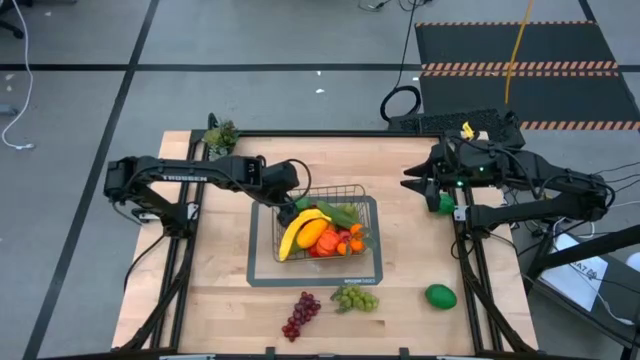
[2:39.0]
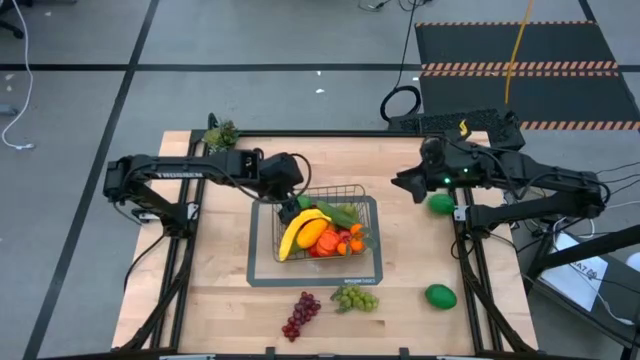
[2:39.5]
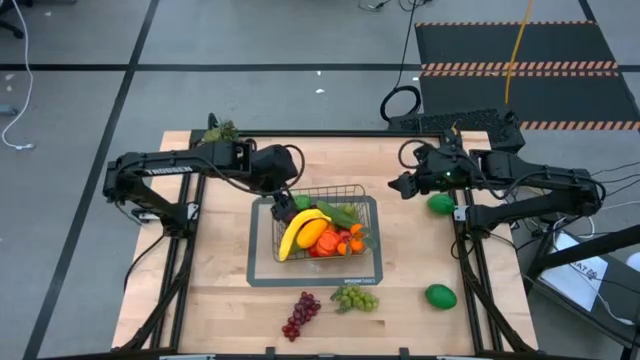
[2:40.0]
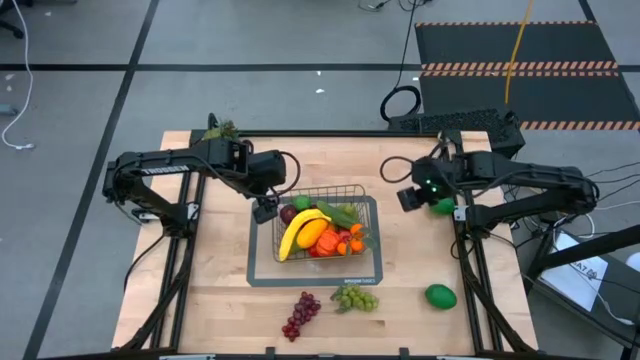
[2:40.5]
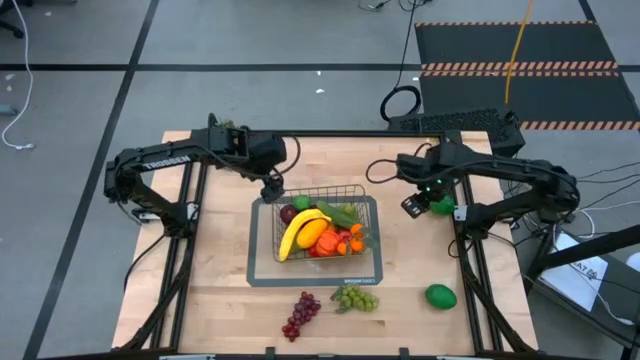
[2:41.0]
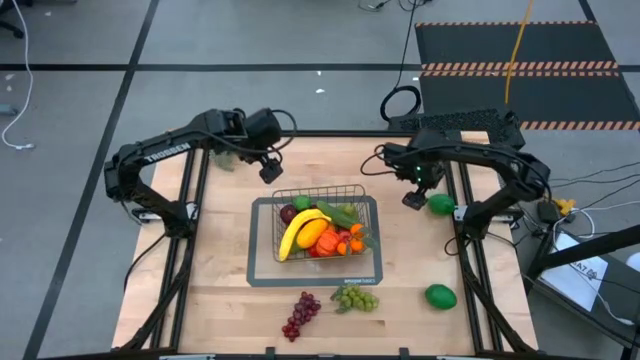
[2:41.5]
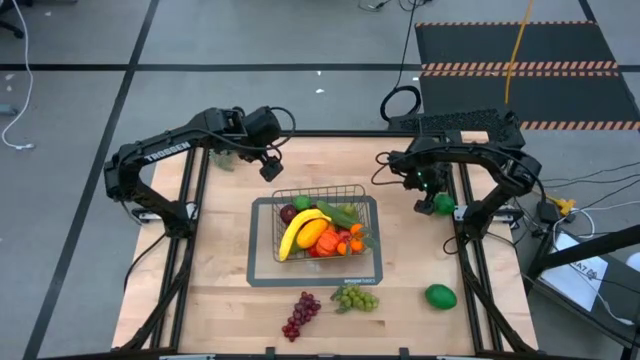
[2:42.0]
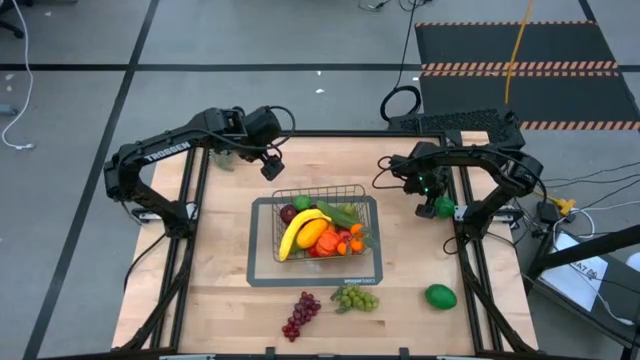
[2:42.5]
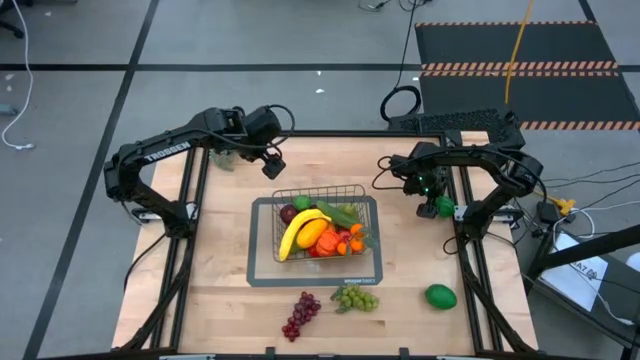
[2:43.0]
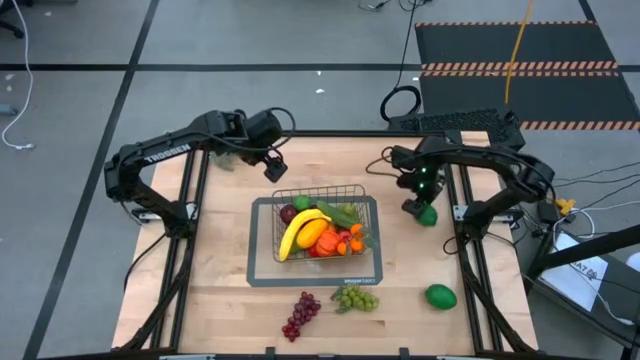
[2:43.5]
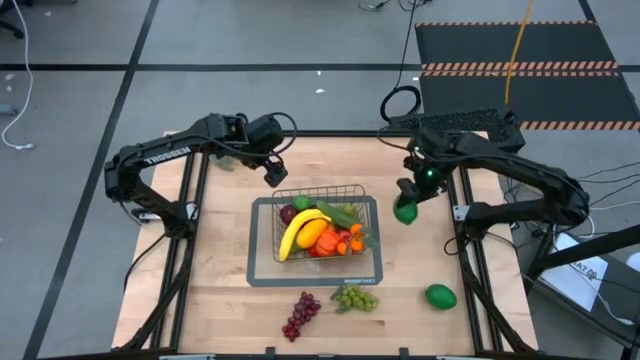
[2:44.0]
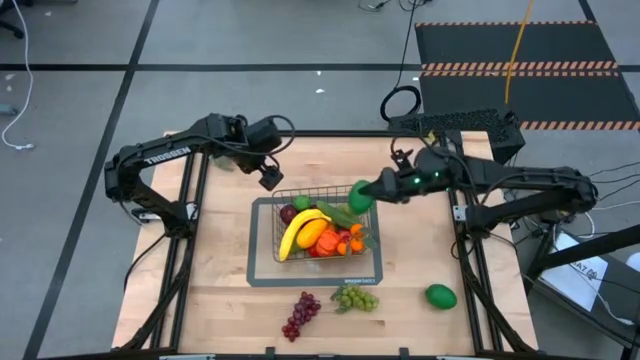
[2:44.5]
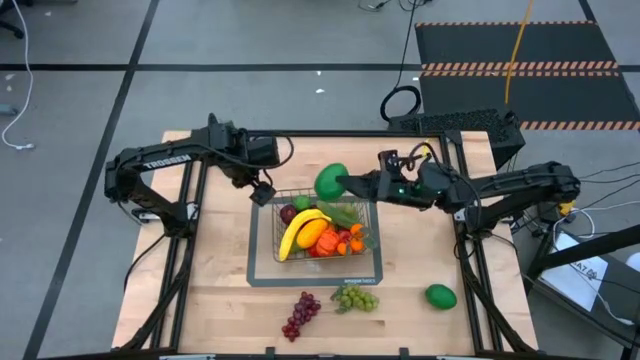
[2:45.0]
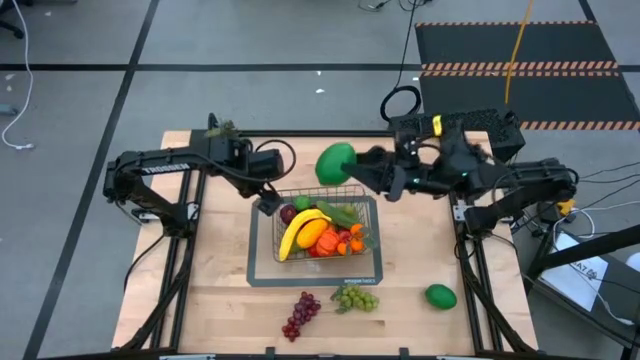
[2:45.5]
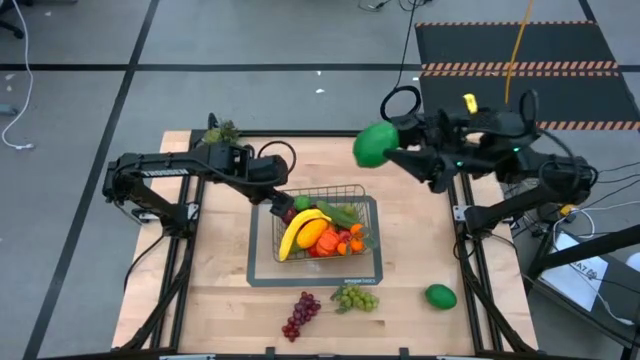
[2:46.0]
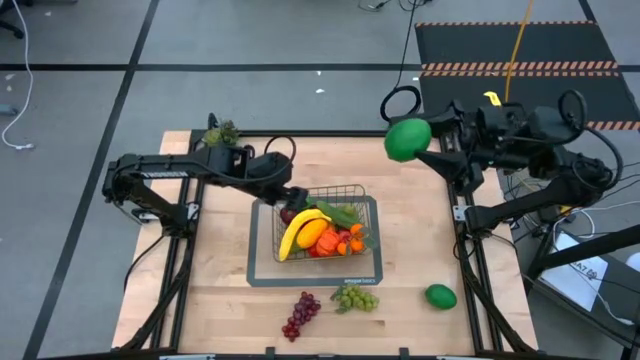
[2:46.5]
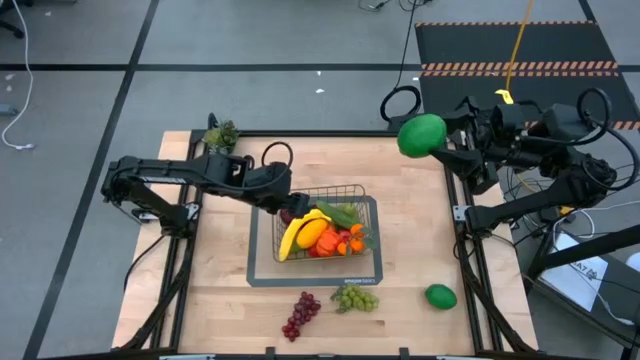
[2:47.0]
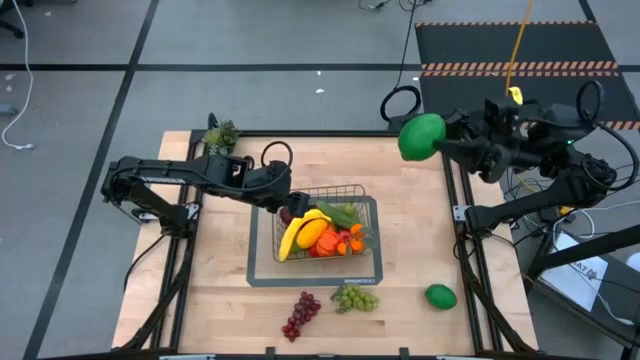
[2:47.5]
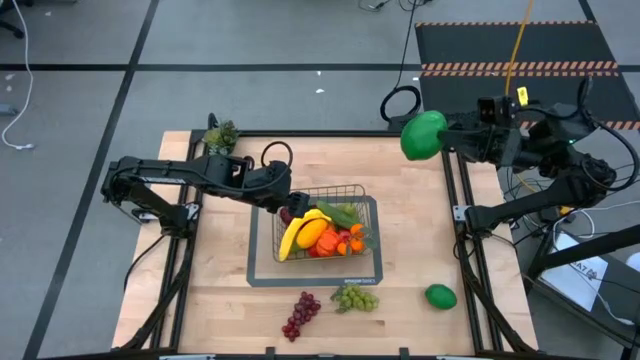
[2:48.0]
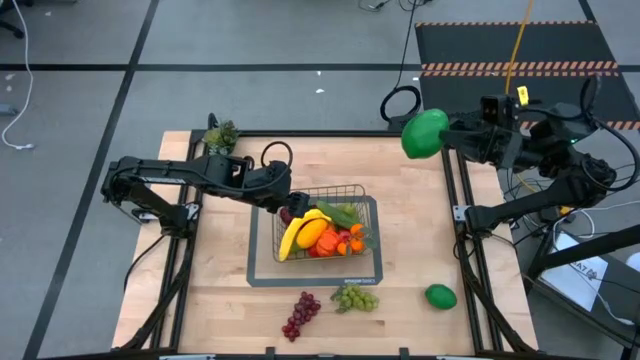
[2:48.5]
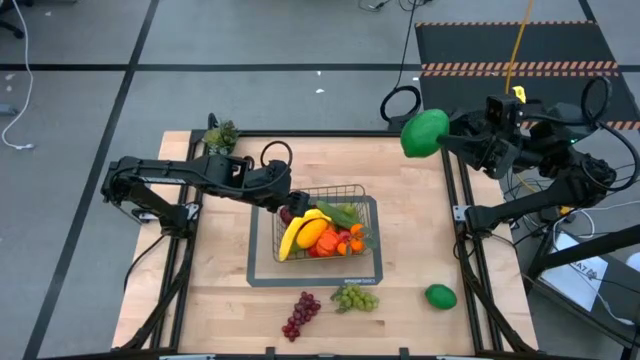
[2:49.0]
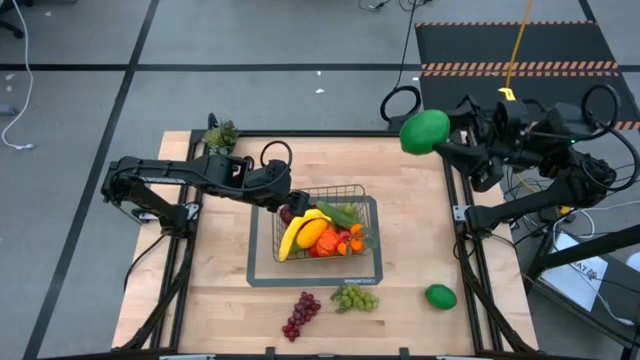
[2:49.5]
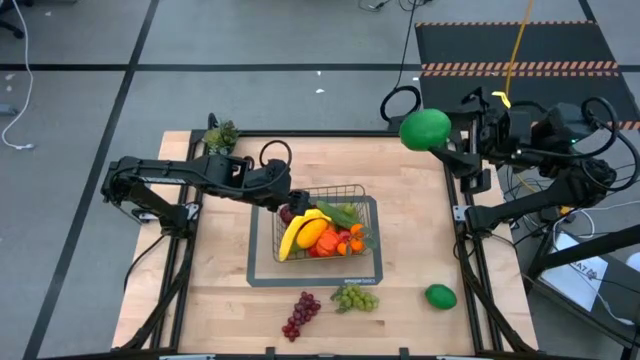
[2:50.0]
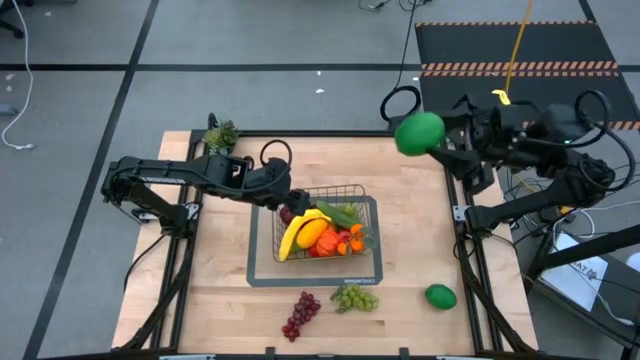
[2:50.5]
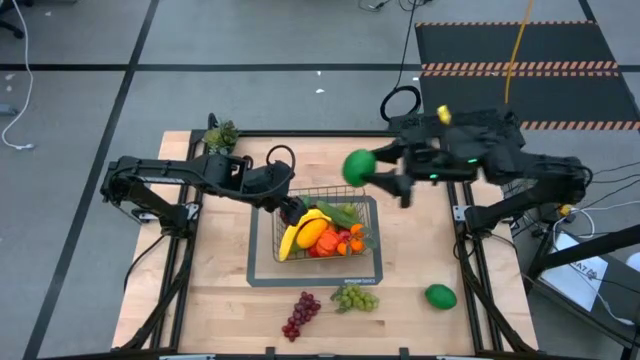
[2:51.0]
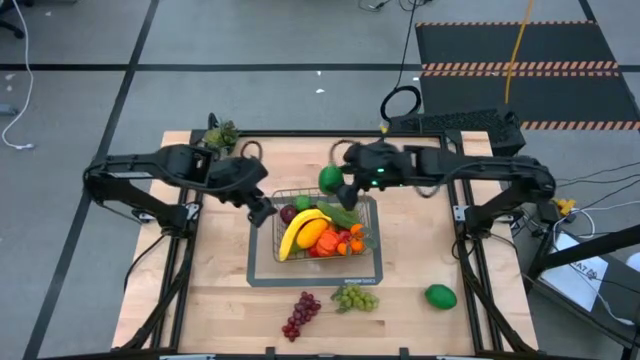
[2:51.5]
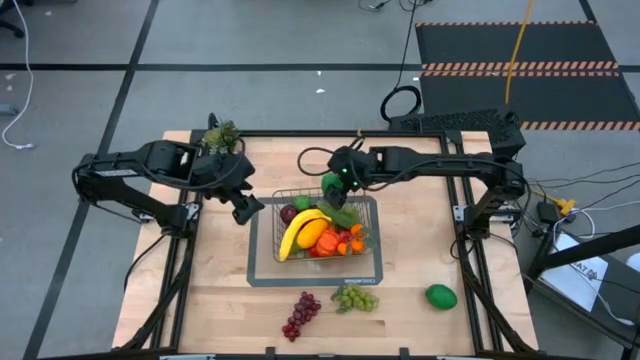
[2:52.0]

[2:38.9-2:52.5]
Task: Build produce basket
Put the top lime into the gold wire basket

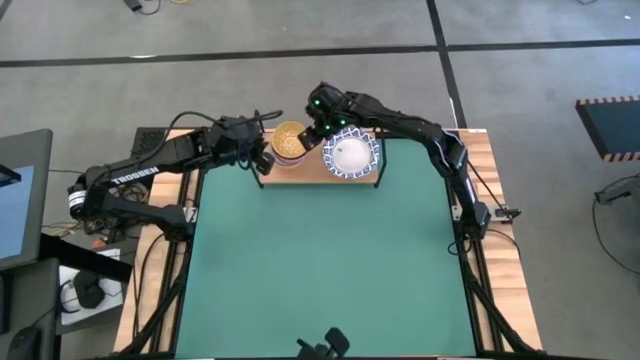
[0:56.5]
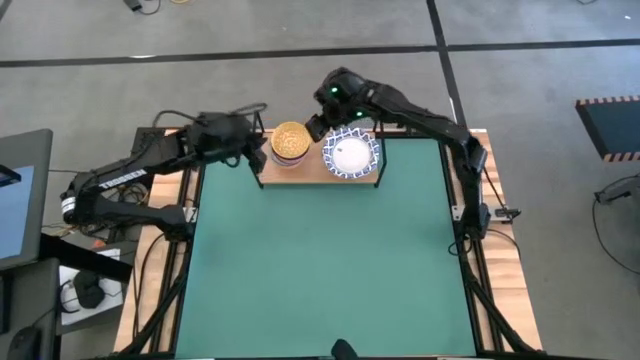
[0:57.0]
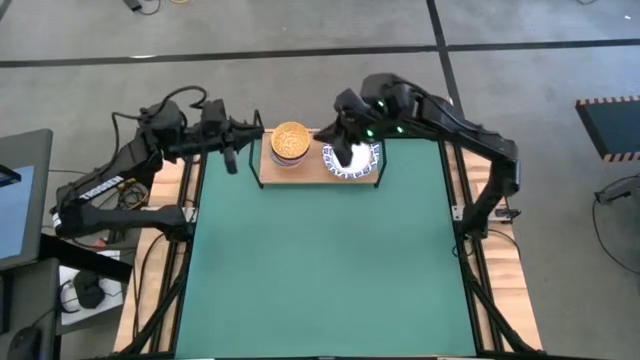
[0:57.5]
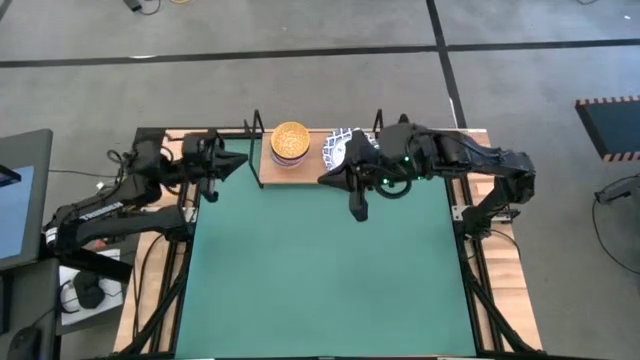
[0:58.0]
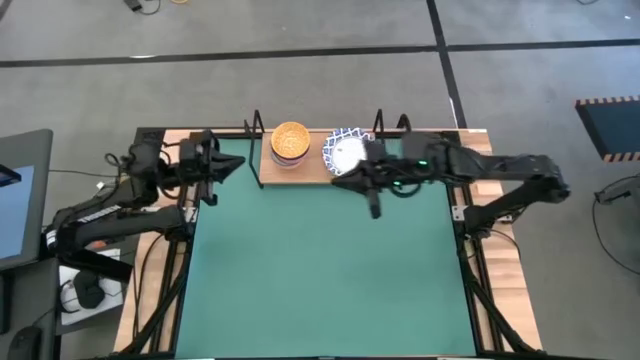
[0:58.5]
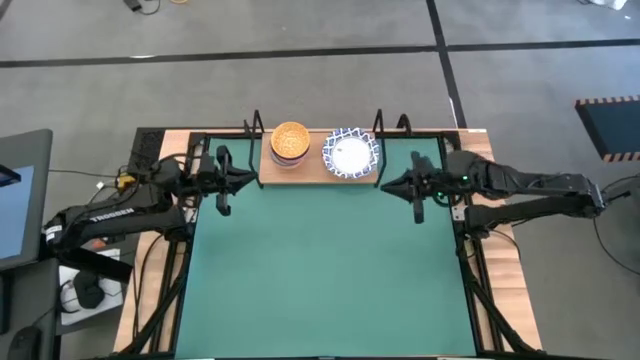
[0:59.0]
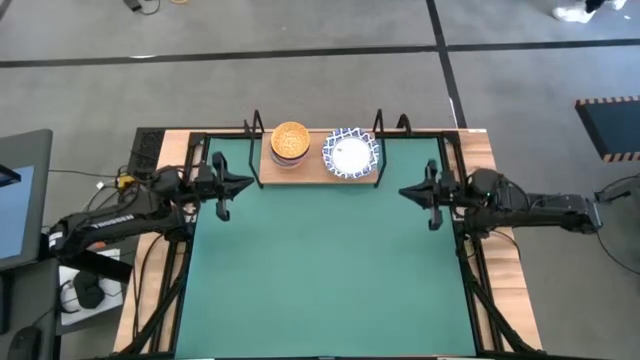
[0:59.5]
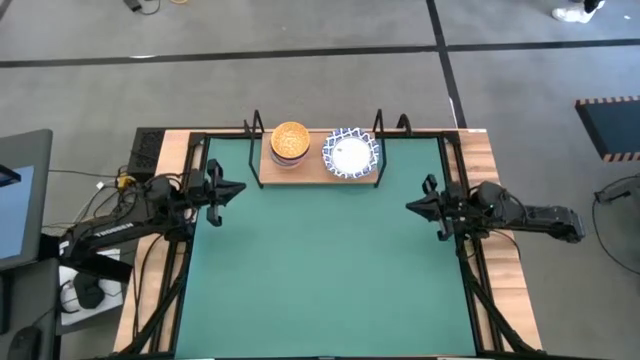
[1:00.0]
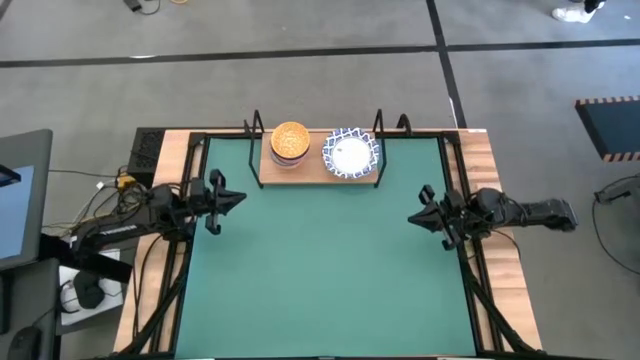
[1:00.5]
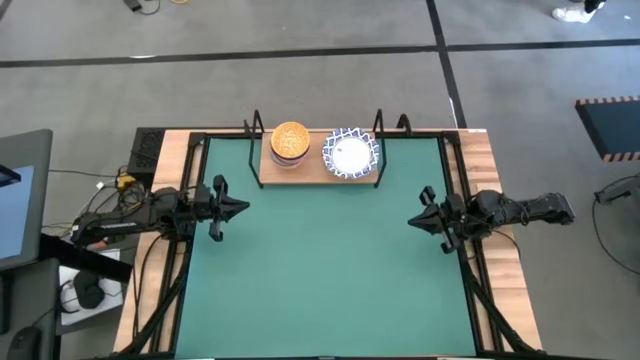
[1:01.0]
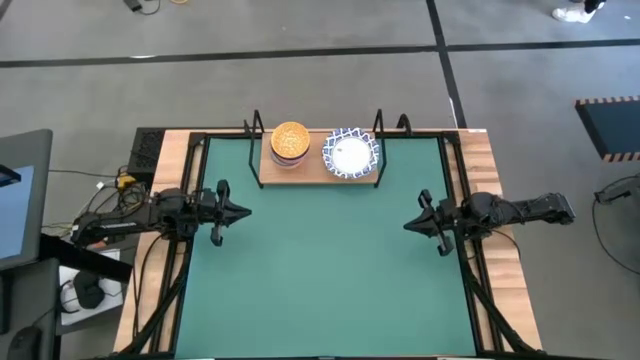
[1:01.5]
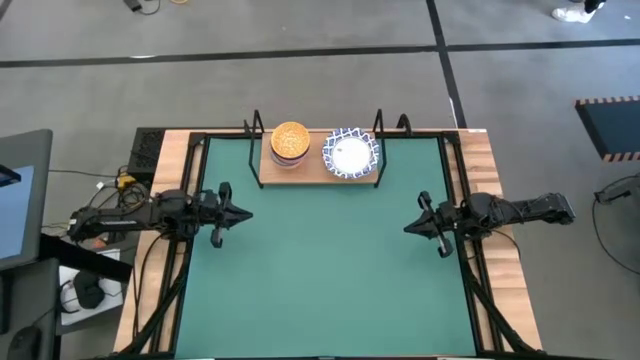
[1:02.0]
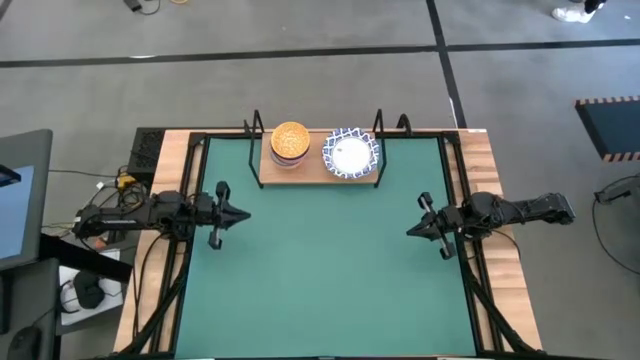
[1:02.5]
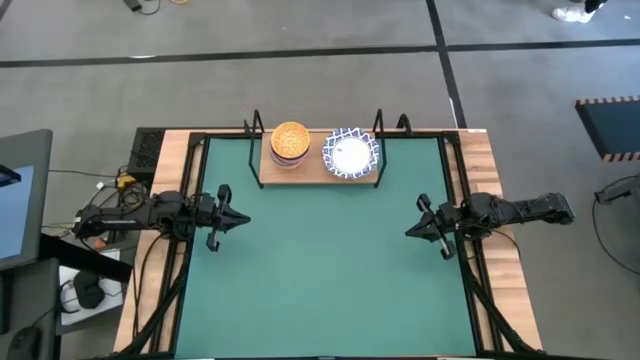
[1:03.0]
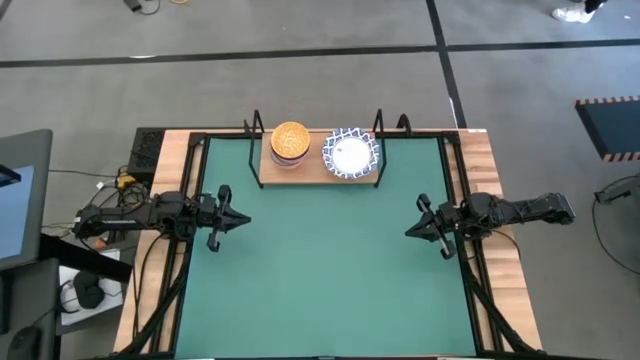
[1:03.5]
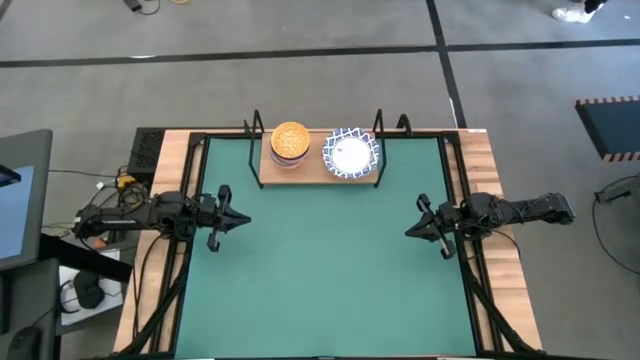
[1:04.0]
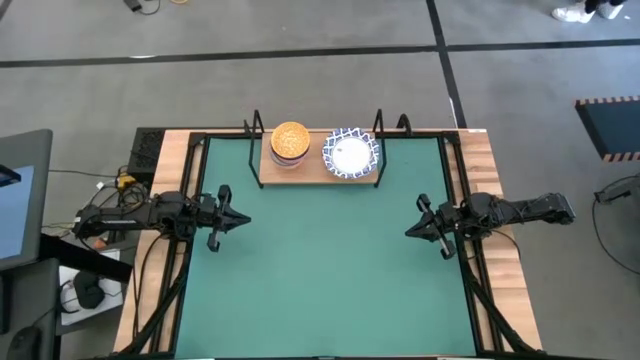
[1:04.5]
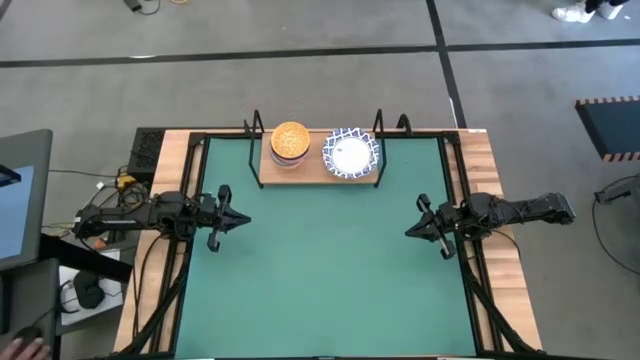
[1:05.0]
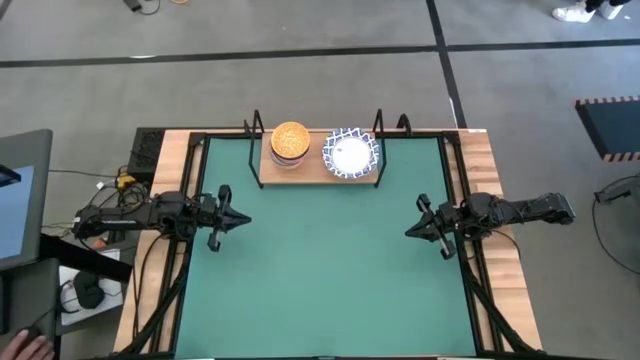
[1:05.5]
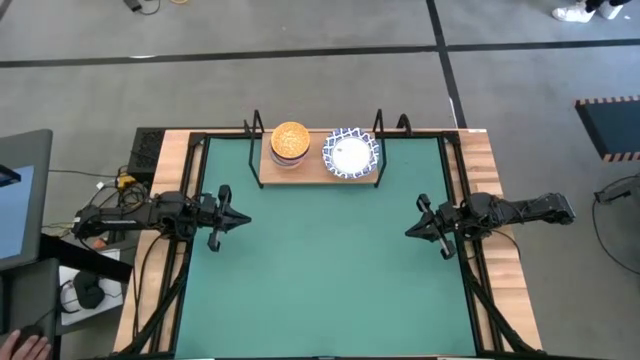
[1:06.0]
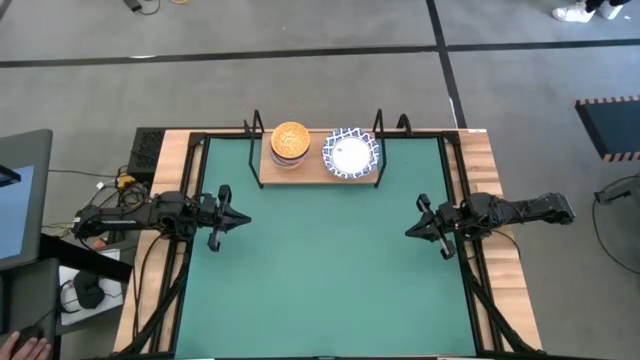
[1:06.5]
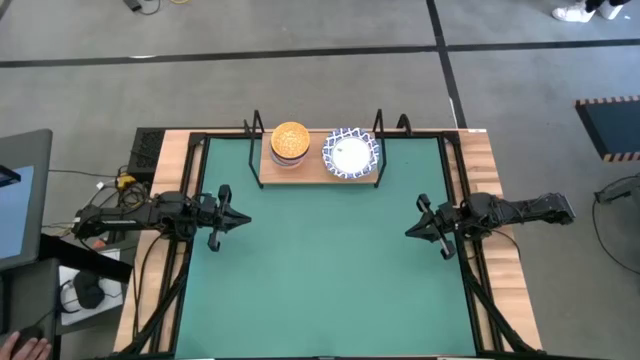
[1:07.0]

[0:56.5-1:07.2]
Task: Place and stack bowls onto a shelf
Return to Home Position
